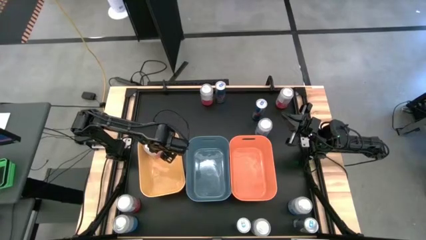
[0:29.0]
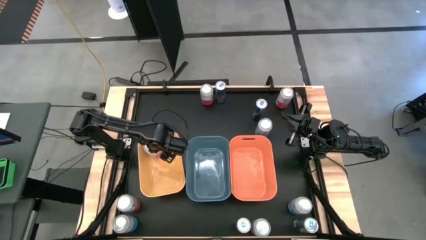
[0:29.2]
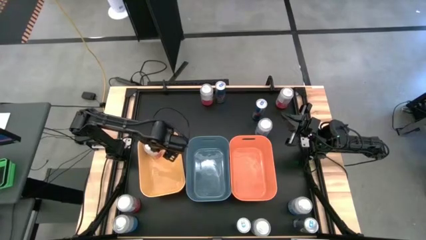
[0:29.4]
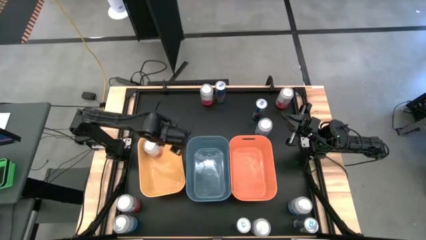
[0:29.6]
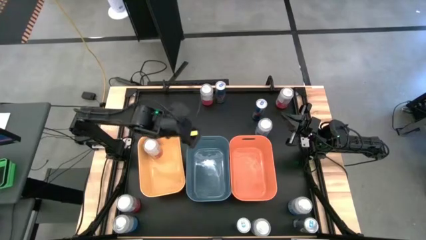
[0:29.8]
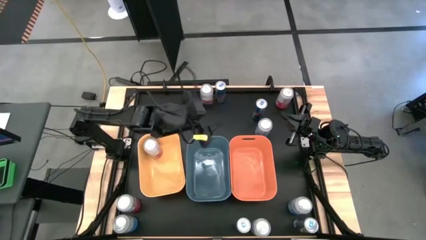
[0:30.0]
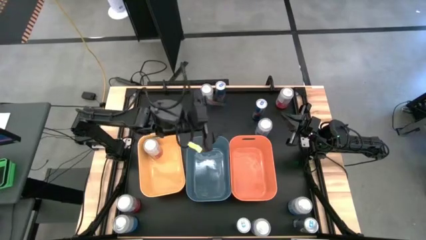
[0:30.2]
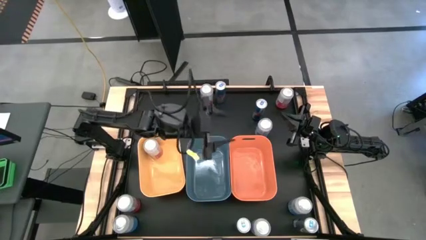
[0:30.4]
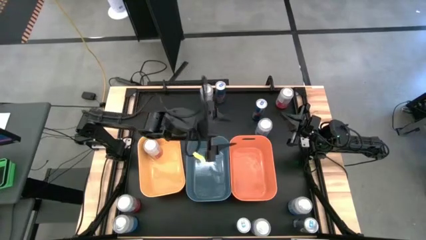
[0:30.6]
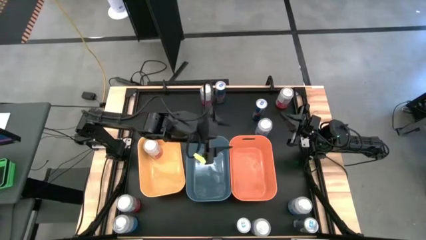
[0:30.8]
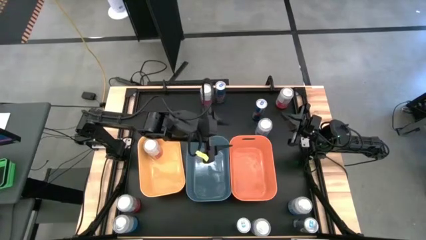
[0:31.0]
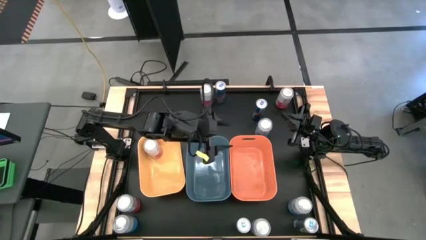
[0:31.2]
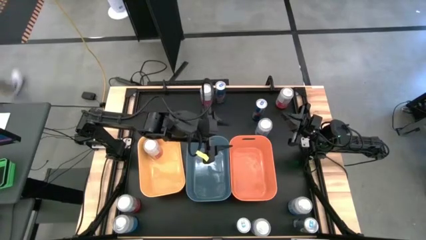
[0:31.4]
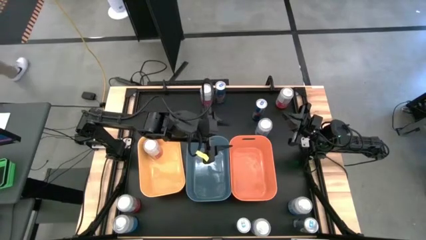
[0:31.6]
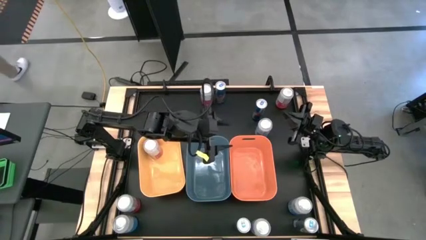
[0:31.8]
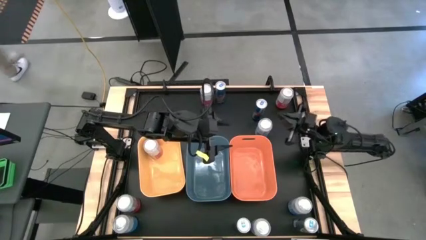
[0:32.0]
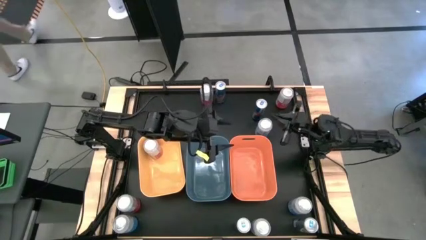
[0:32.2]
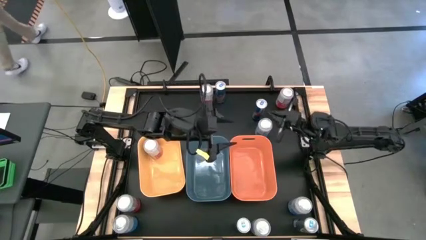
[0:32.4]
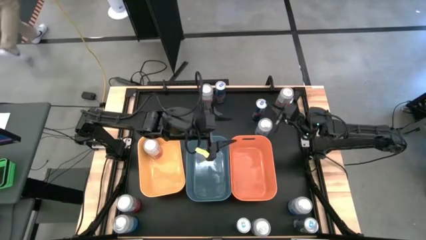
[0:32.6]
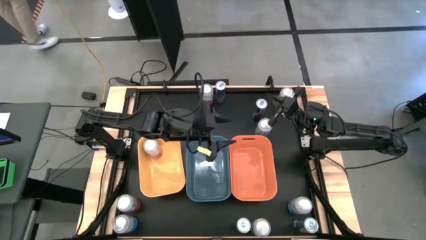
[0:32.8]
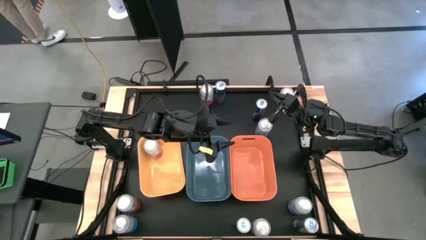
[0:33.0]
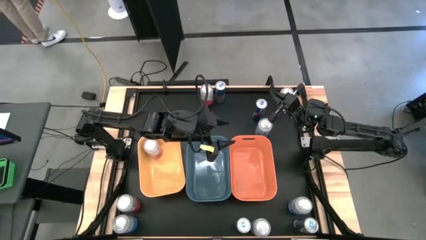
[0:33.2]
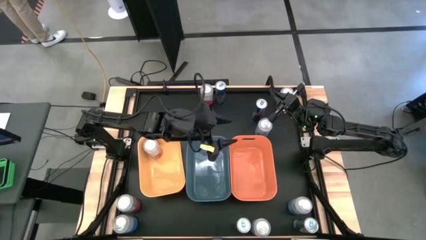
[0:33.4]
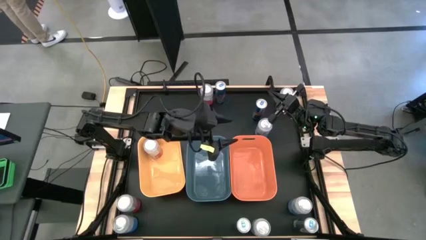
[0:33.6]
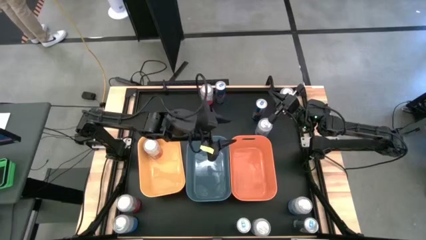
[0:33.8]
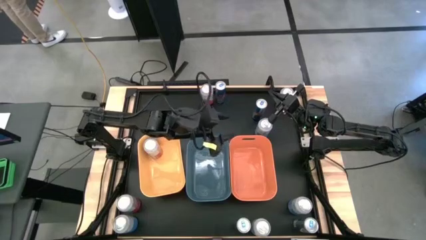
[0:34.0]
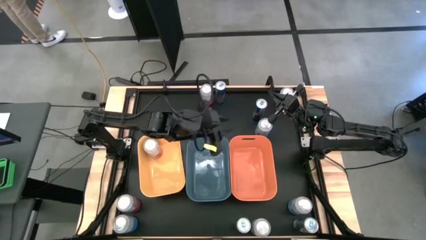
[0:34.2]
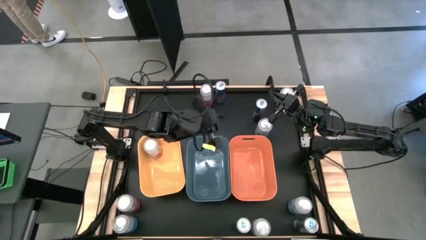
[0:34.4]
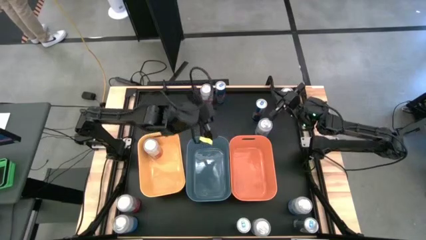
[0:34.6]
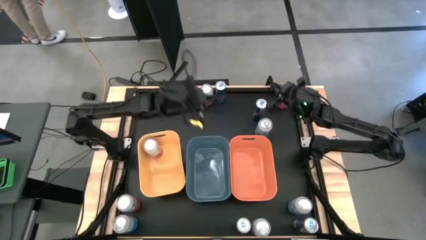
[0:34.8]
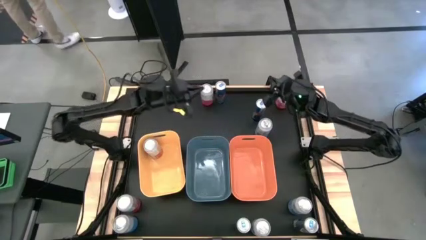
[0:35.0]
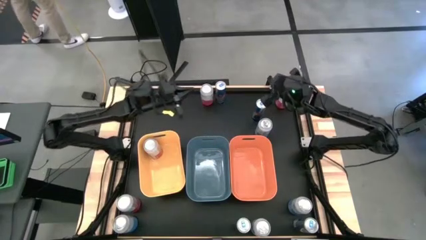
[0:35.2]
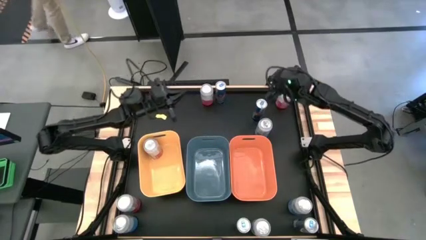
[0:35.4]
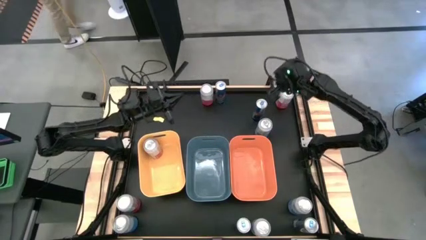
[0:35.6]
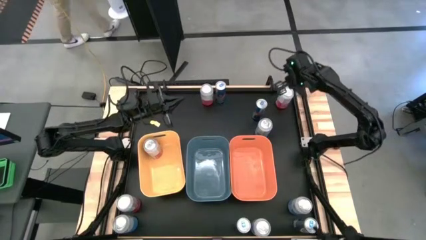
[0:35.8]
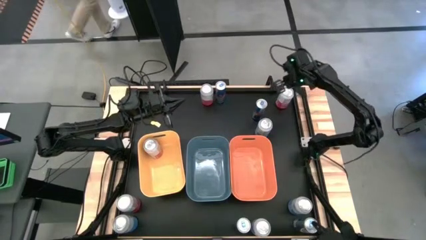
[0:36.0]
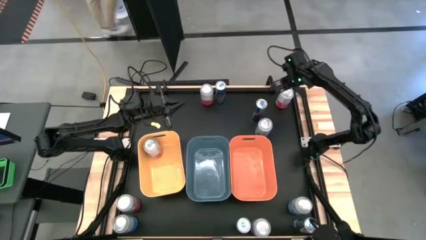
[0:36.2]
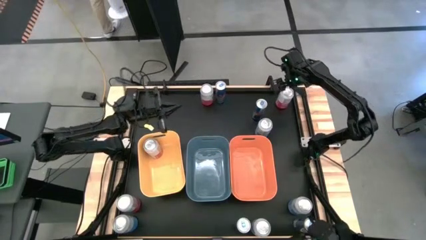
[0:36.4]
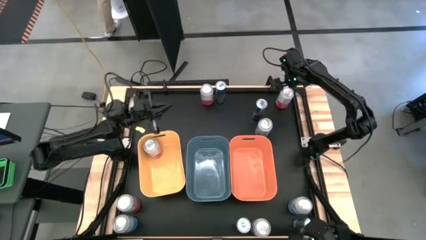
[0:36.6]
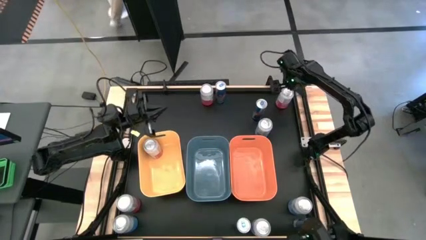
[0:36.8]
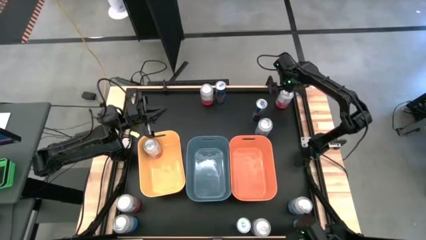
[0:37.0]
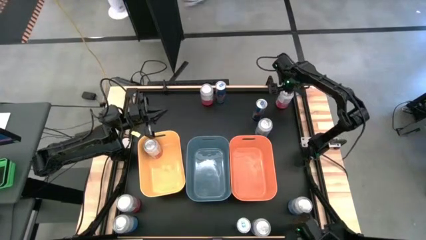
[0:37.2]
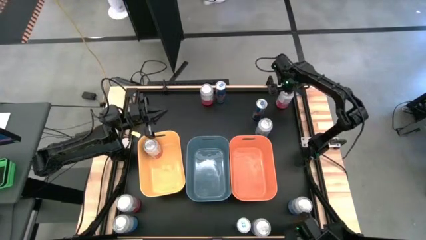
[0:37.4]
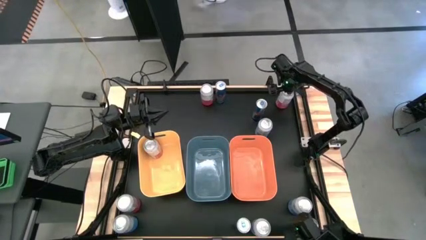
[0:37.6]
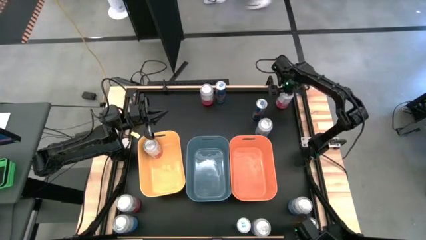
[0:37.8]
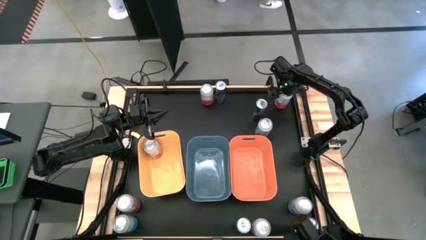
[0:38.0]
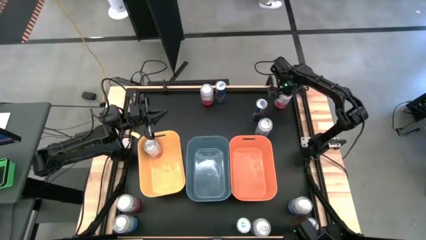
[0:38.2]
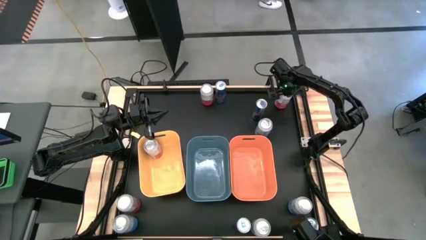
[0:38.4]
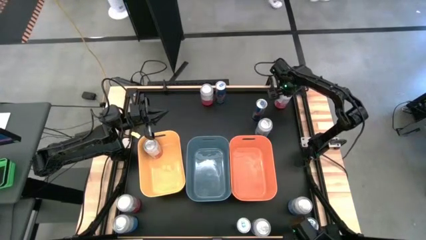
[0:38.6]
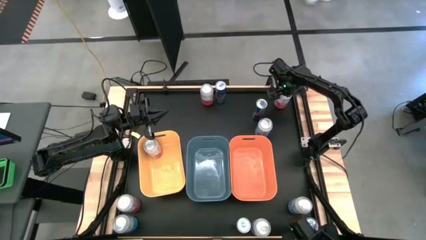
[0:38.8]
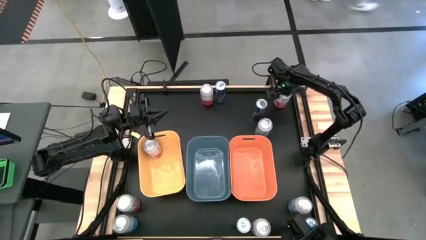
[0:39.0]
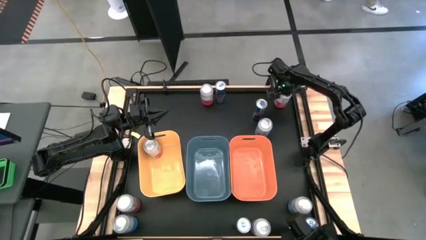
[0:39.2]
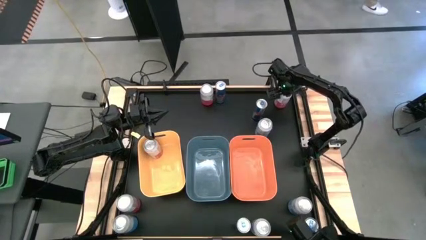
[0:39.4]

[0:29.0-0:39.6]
Task: Sort soda cans
Put the top right pink-white soda can into the yellow bin
